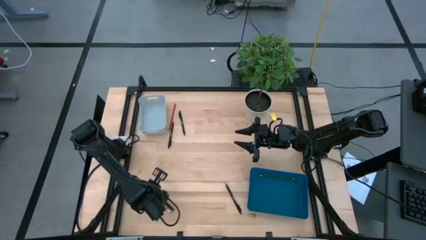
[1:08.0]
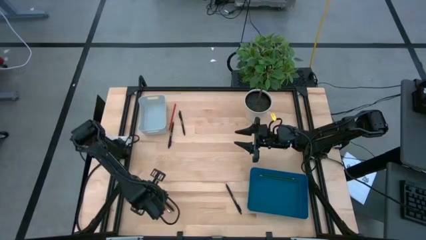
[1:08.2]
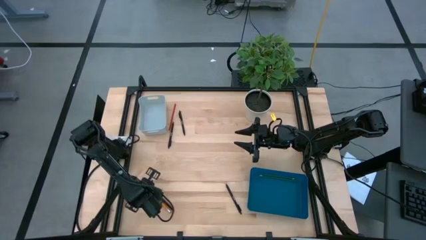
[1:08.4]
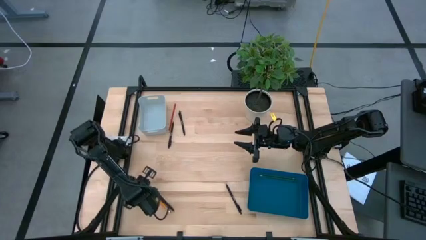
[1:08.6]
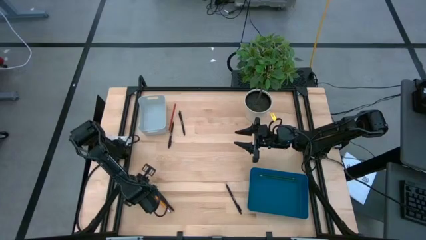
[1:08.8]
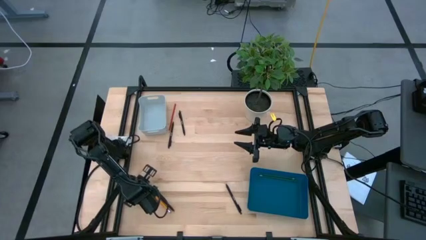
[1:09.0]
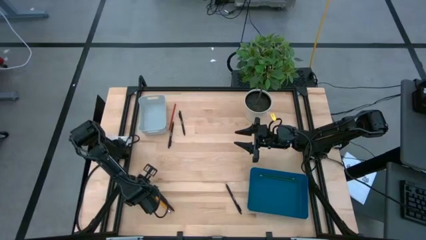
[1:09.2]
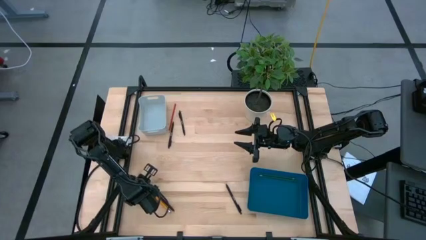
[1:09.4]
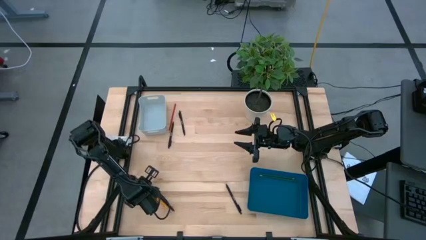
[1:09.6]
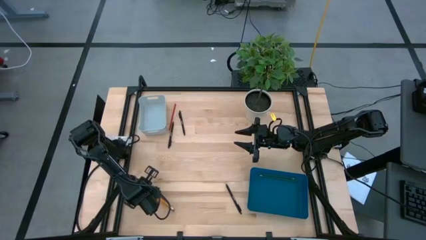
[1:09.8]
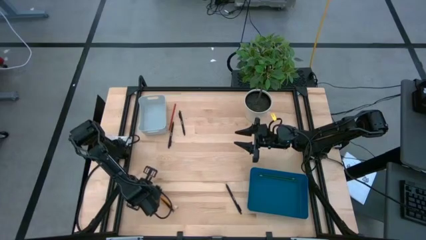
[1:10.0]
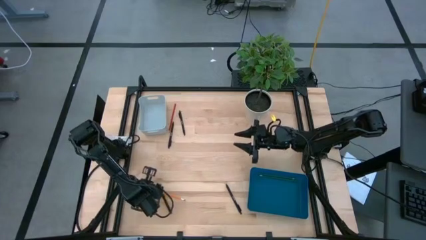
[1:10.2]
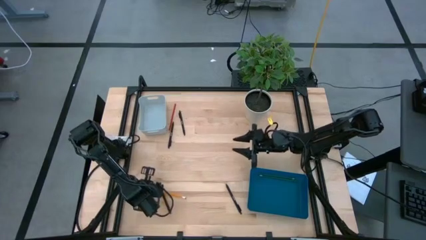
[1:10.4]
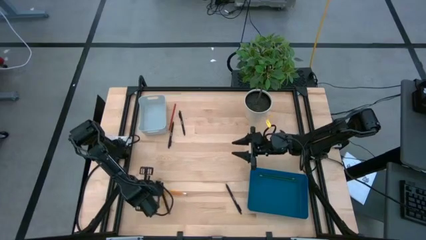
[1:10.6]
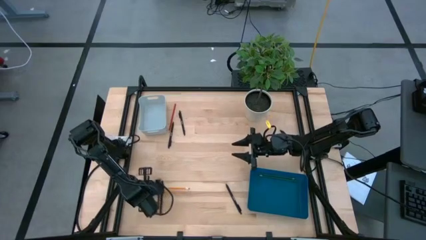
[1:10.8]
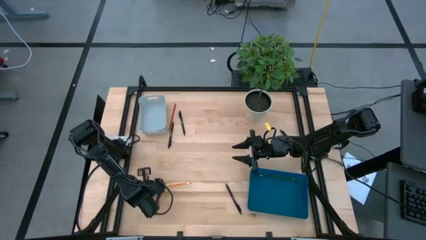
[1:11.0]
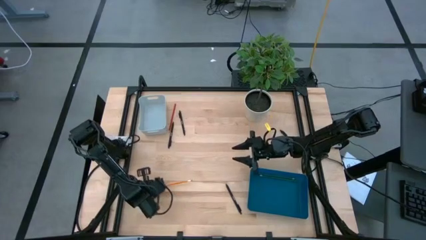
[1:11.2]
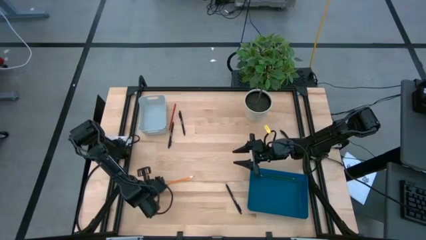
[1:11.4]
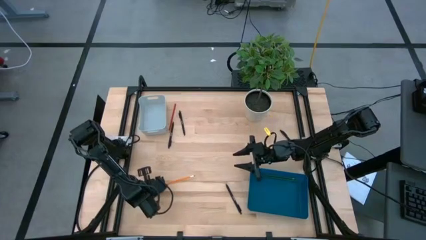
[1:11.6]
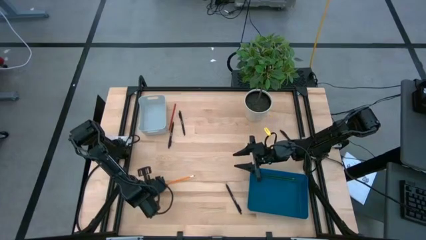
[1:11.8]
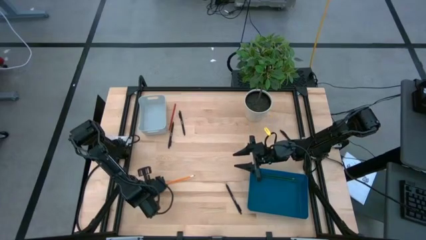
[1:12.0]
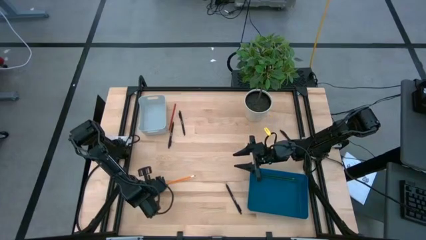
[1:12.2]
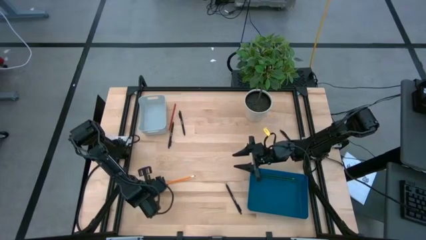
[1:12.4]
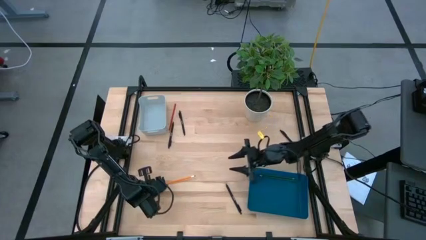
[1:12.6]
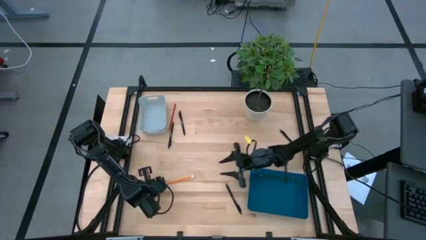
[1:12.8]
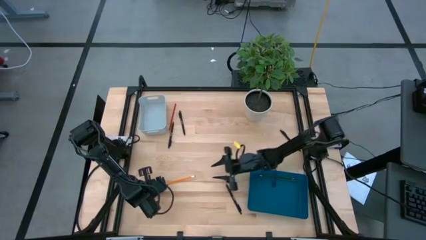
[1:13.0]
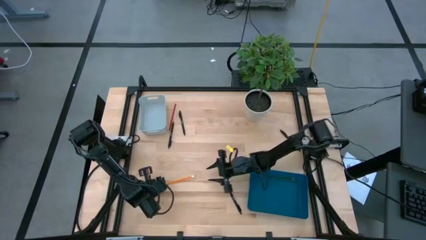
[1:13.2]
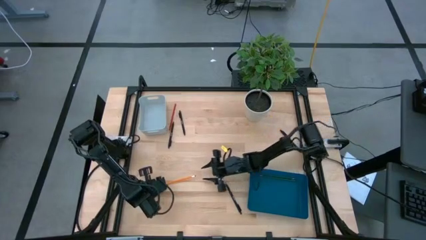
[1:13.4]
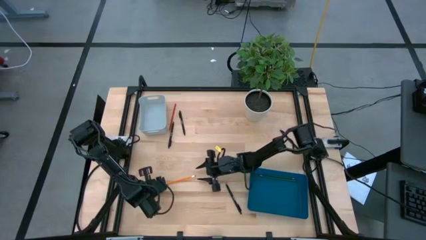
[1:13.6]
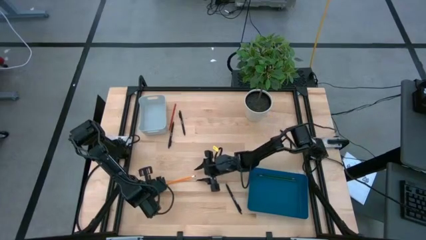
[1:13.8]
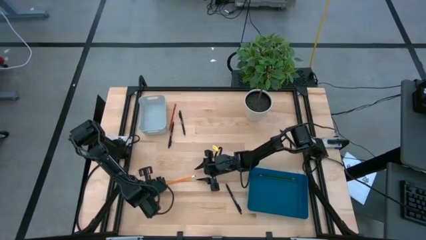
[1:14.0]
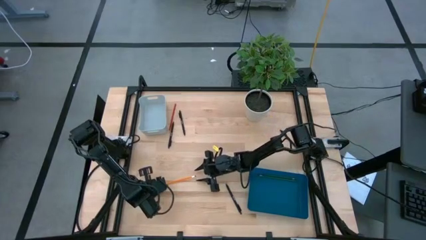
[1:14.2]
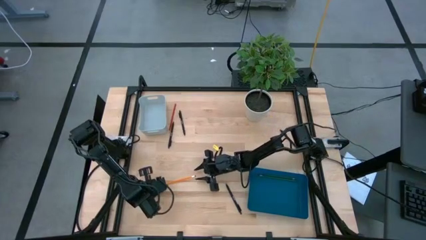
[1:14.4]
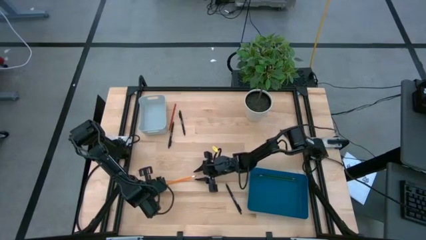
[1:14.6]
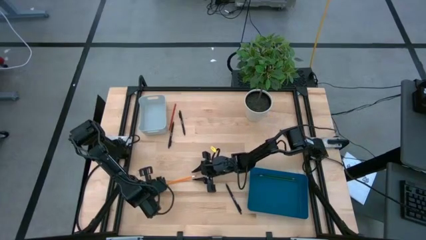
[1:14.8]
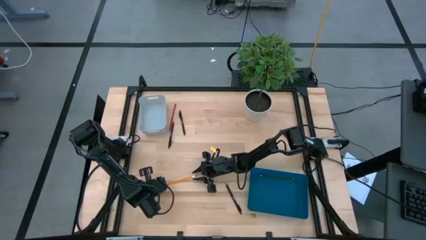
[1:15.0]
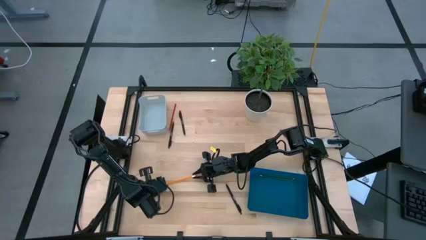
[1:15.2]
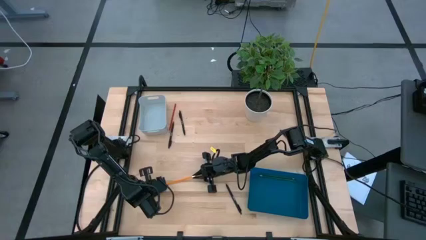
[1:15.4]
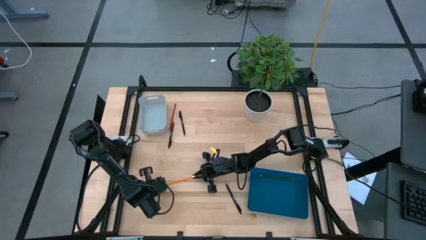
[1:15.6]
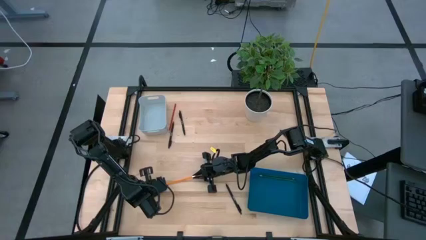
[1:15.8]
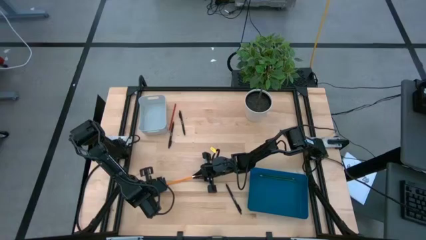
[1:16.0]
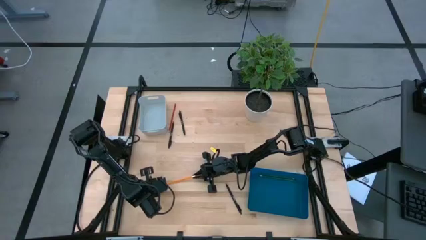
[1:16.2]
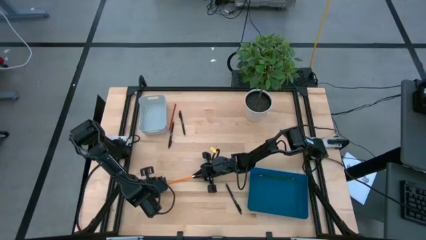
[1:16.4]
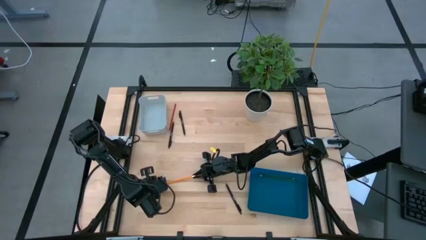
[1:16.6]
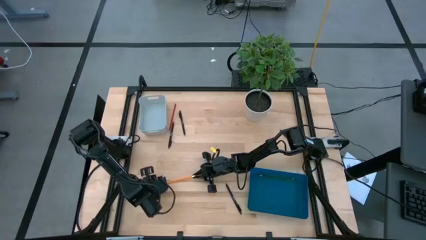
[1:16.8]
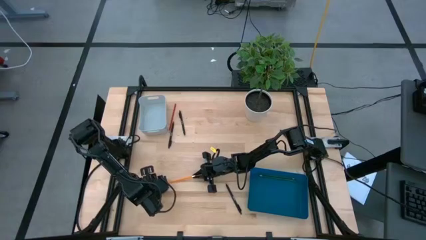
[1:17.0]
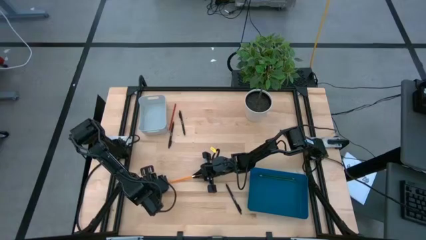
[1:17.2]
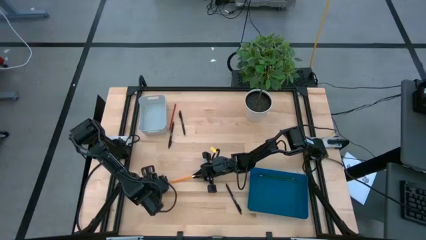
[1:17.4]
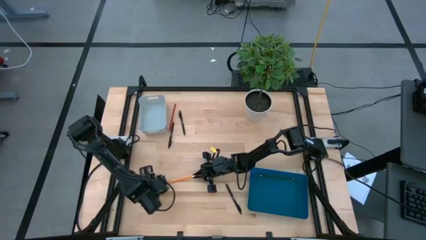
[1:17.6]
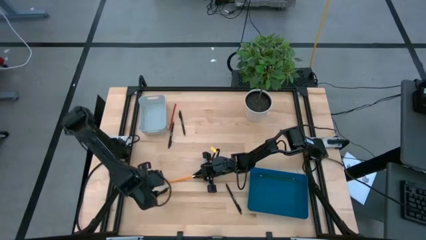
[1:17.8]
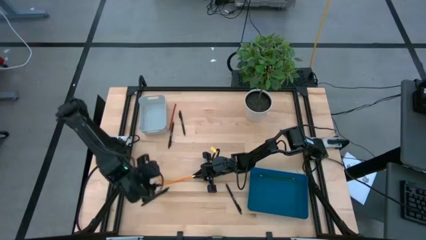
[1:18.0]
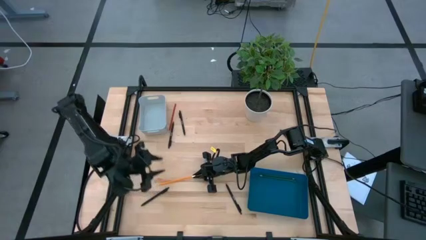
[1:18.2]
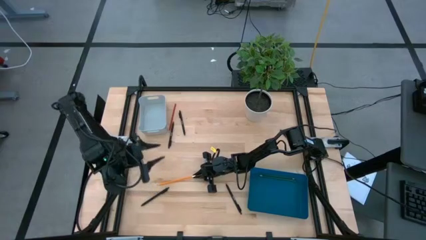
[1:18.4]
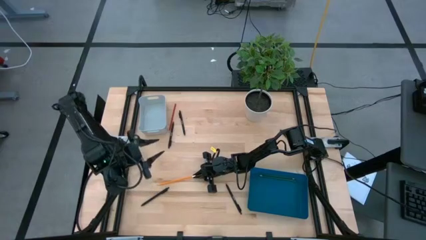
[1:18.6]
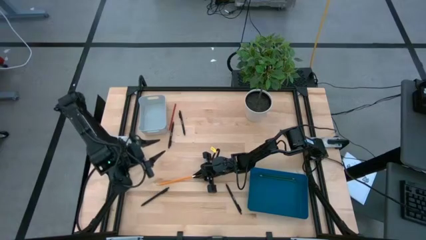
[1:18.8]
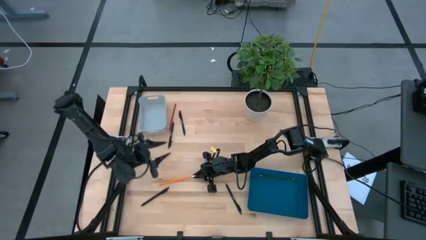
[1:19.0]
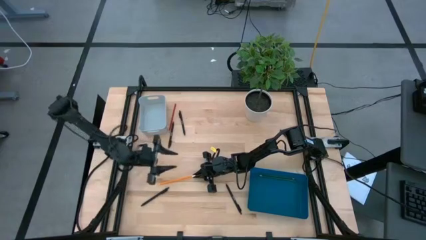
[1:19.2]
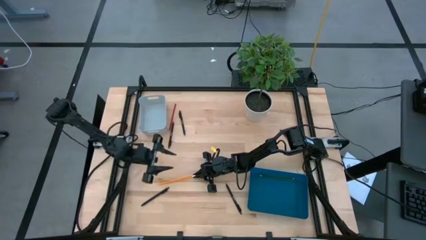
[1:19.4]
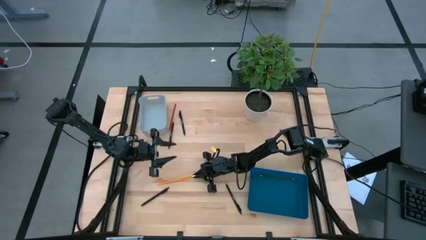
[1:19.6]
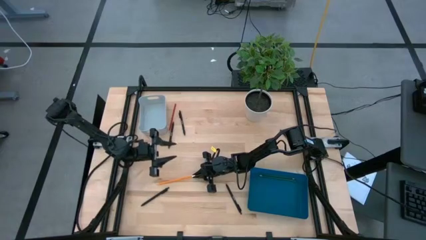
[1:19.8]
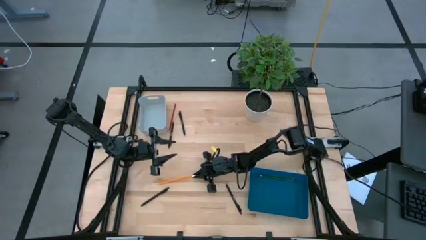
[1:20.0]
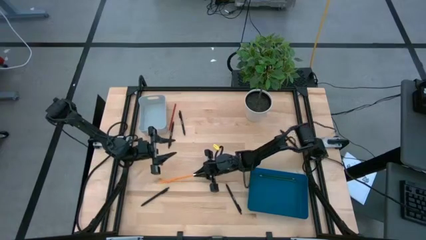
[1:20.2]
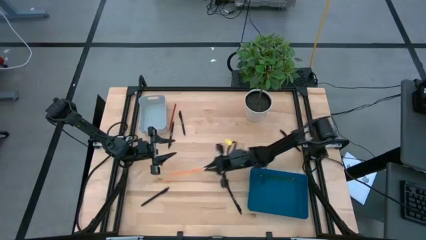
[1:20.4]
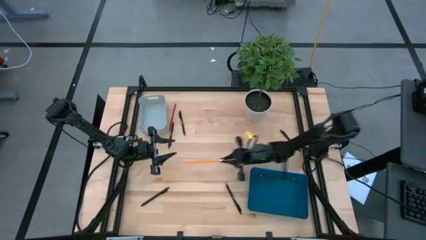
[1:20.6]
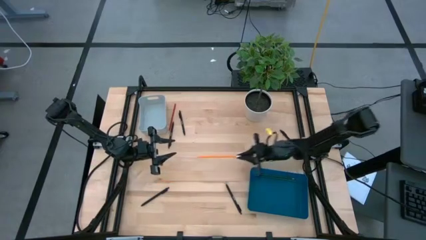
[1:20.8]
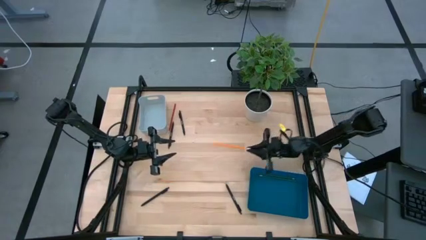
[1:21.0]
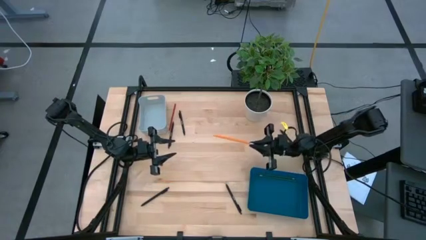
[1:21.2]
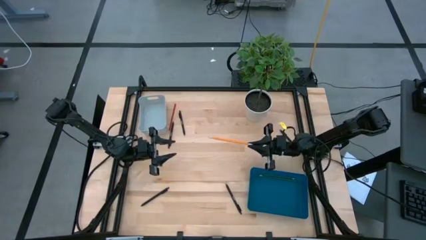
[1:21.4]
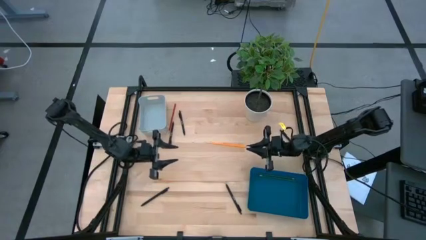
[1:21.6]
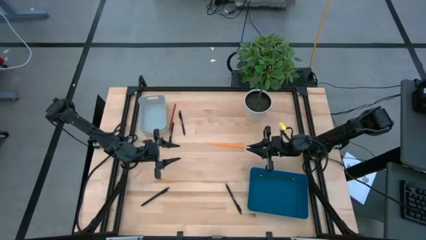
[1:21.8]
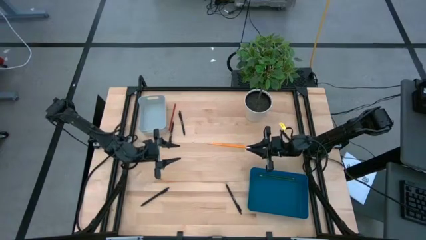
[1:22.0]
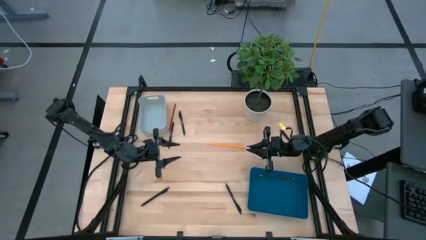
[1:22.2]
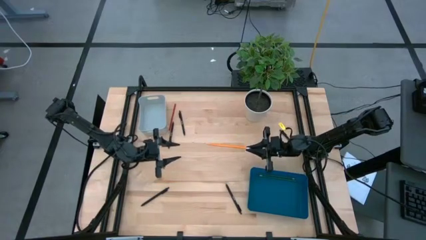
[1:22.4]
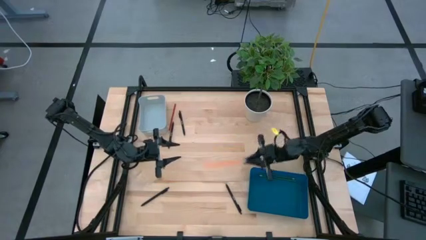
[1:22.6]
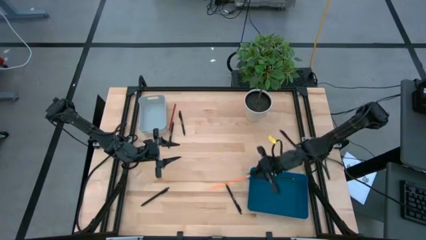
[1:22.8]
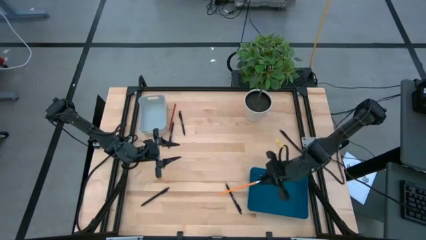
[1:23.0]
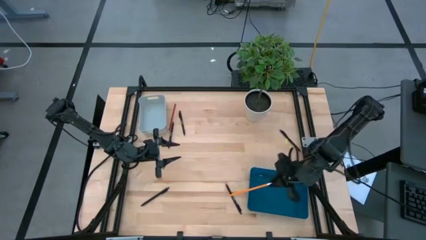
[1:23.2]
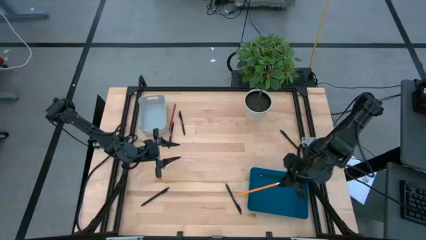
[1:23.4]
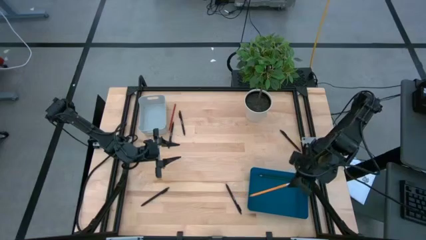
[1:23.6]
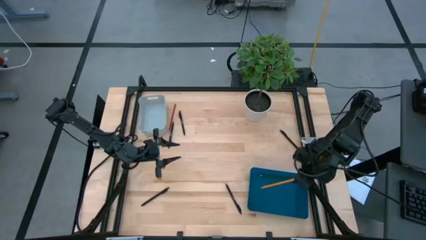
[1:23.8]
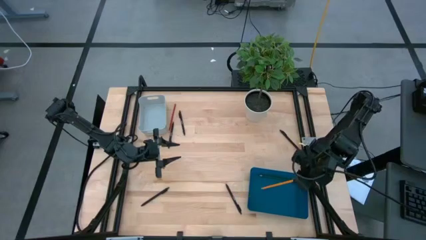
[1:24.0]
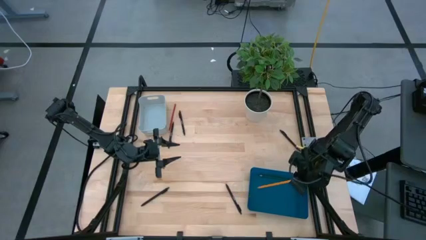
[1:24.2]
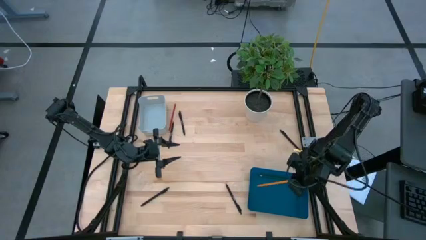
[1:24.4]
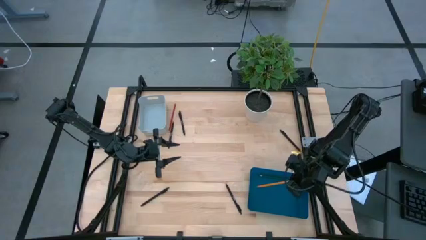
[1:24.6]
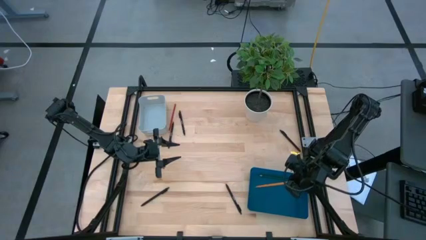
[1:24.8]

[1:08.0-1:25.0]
Task: Sort pens & pencils
Put the yellow pencil into the blue bin
